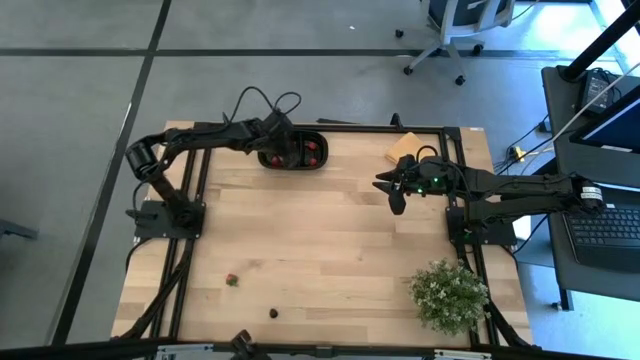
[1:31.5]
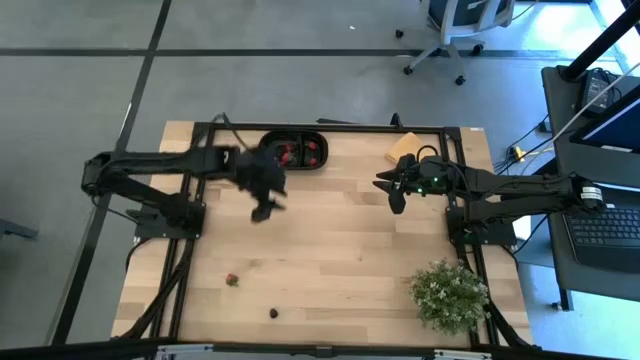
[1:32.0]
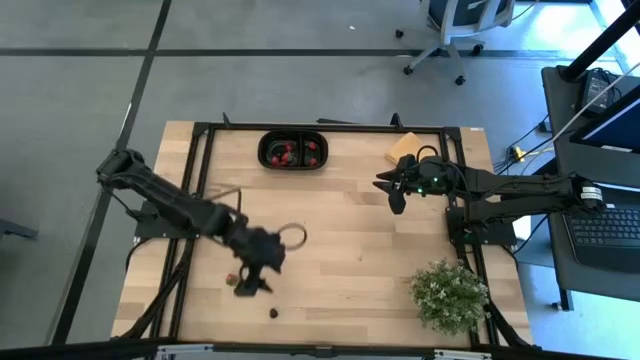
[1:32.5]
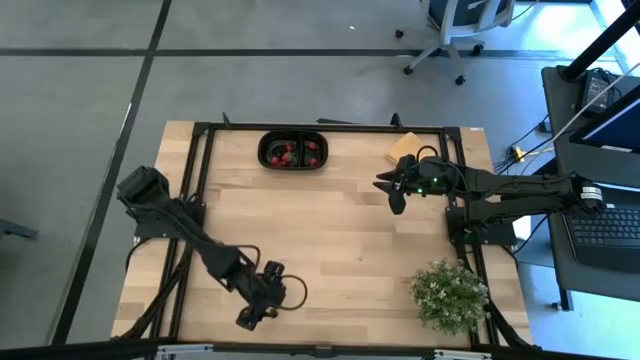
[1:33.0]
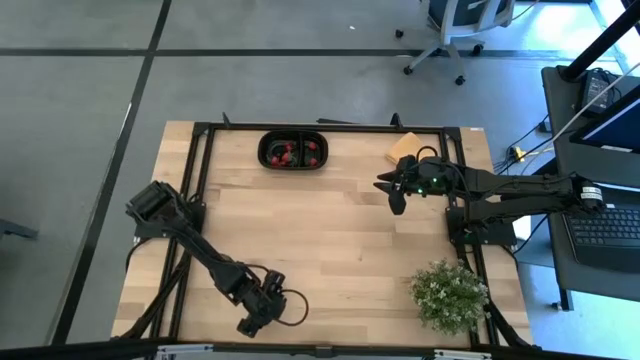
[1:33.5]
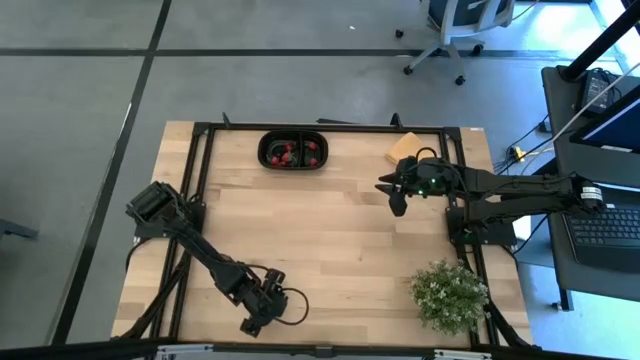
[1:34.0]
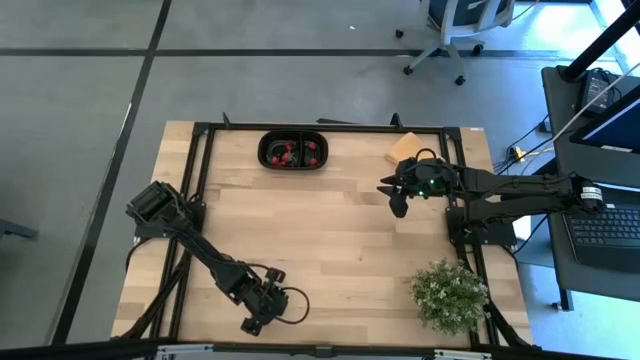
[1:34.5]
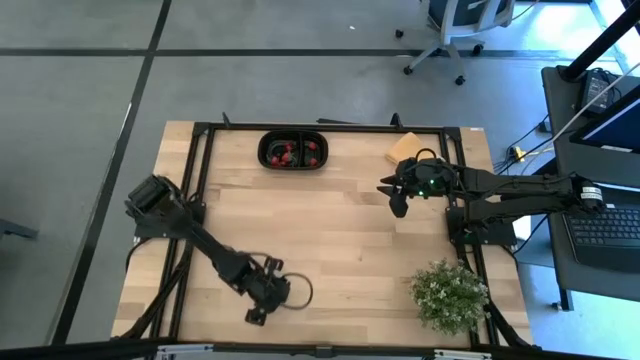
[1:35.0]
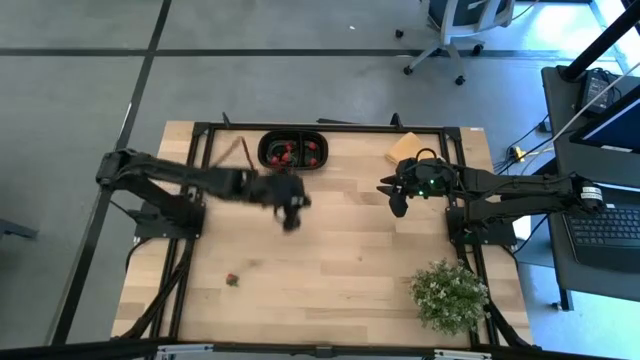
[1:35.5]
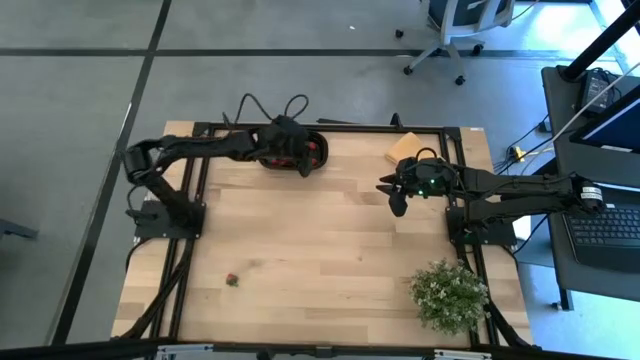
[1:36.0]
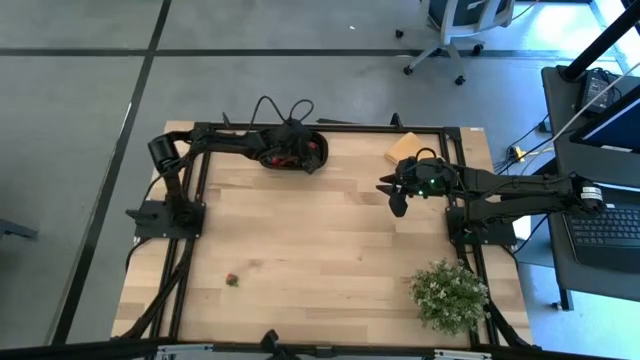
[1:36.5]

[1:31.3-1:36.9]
Task: Pick and placing Produce into tupperware
Put the blackberry into the black bin

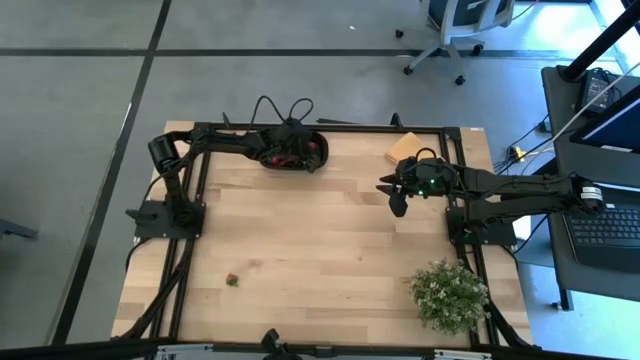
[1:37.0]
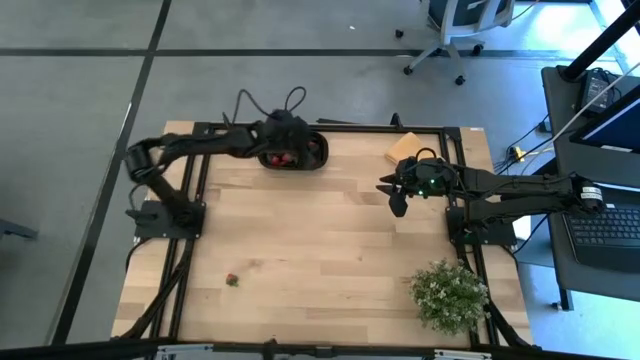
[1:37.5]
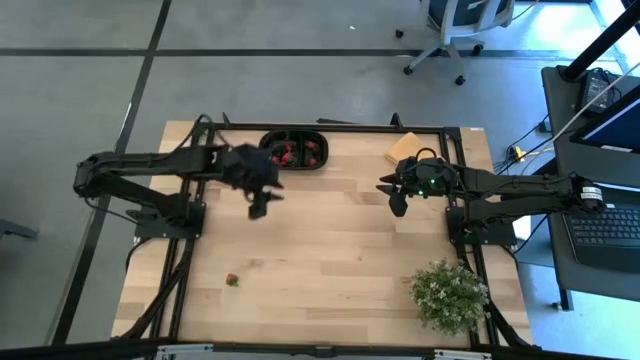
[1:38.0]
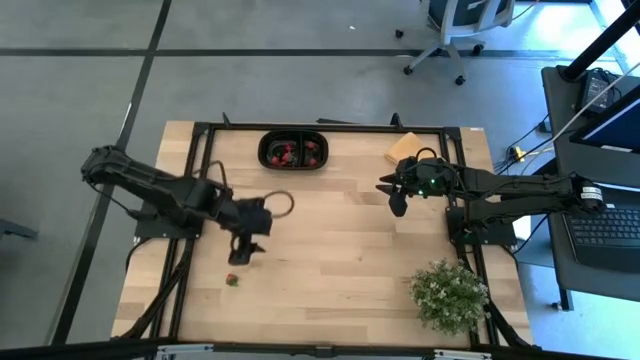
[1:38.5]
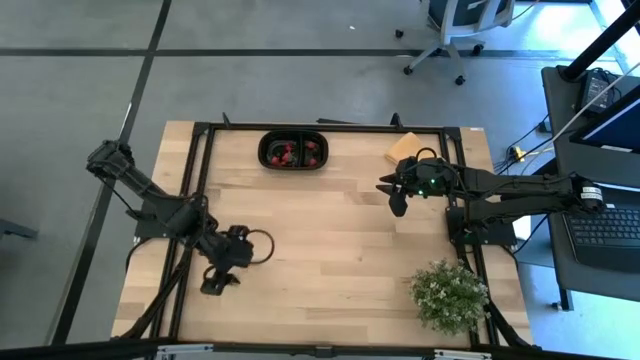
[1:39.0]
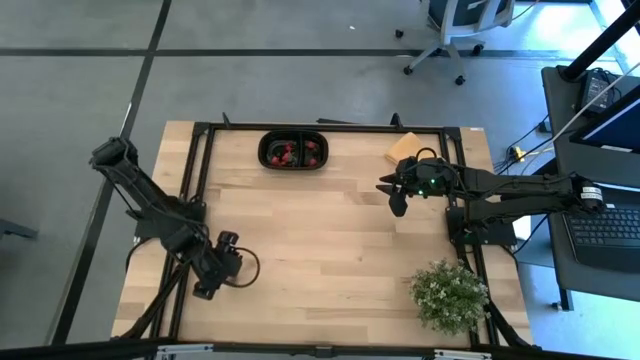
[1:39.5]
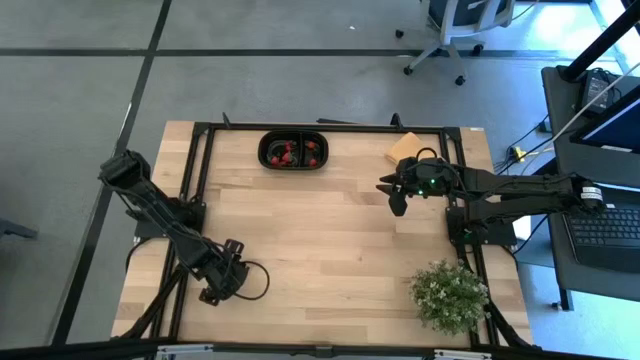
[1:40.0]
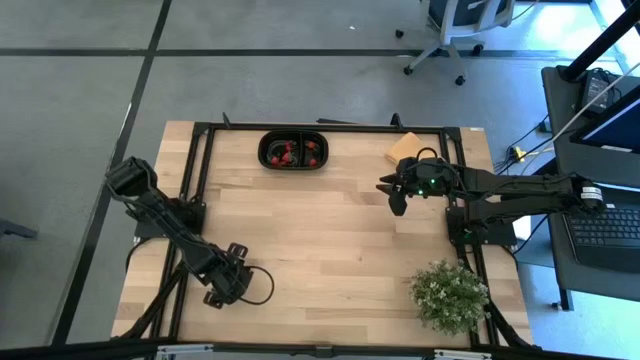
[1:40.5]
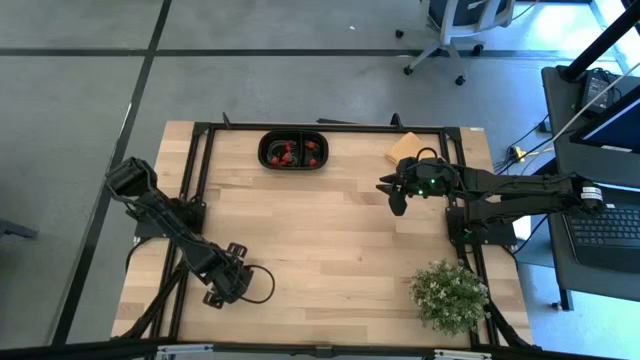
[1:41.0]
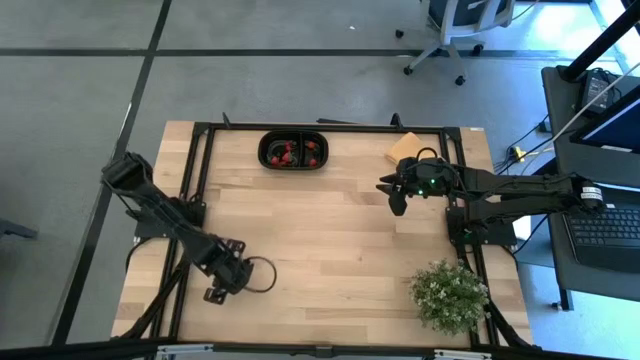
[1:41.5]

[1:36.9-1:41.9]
Put the strawberry into the black bin

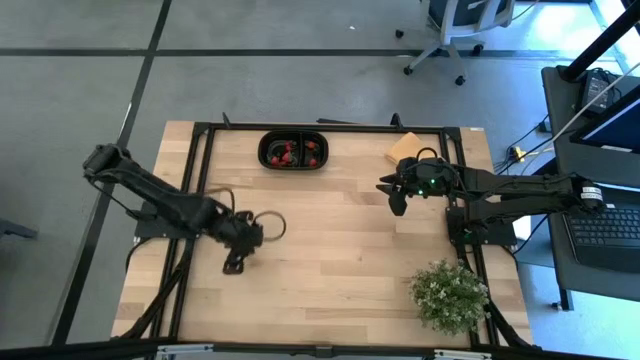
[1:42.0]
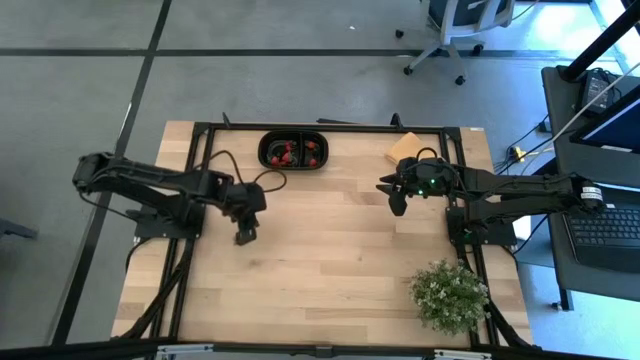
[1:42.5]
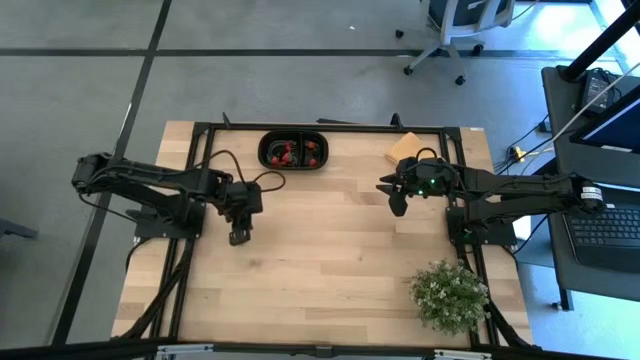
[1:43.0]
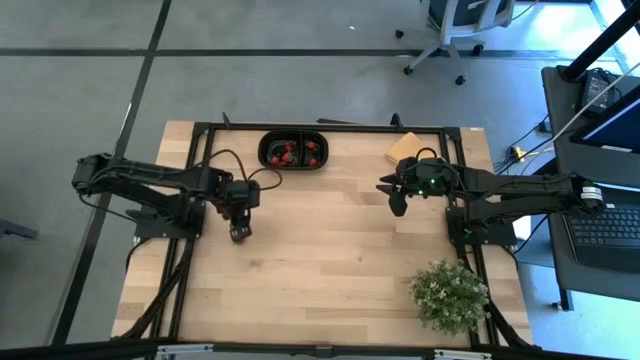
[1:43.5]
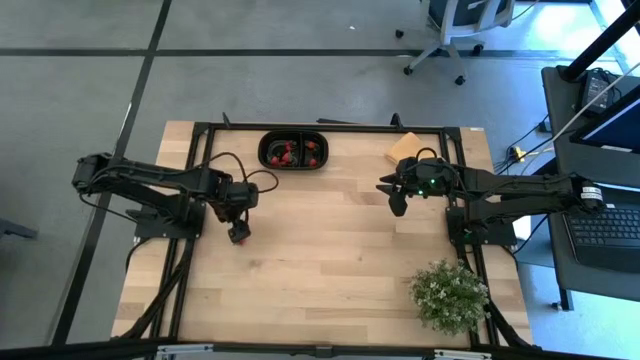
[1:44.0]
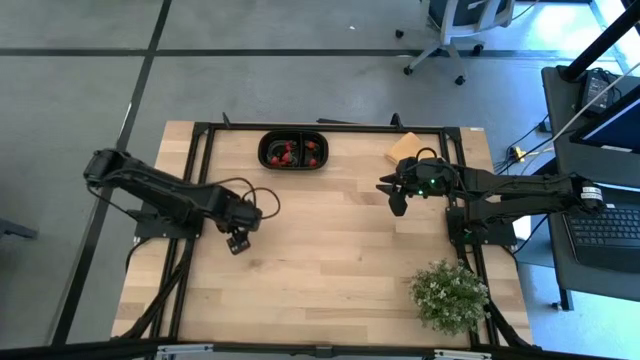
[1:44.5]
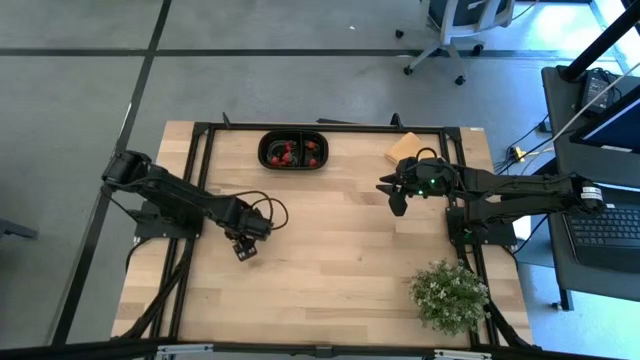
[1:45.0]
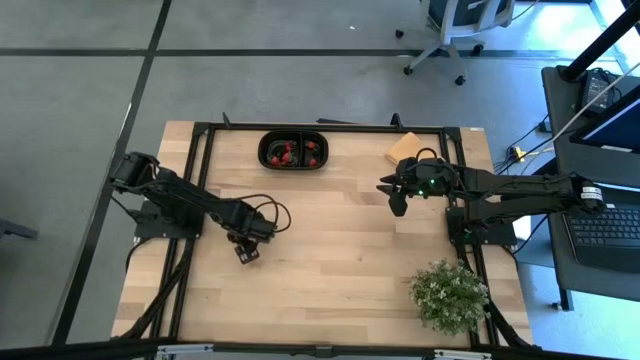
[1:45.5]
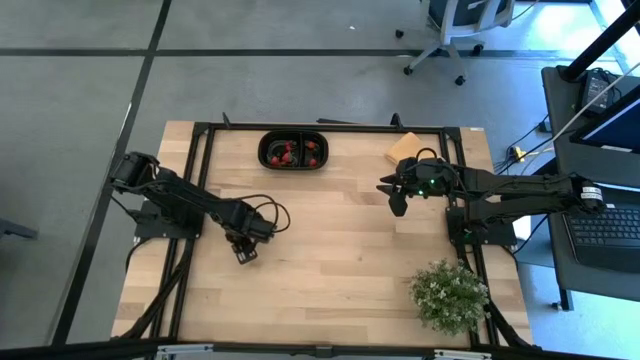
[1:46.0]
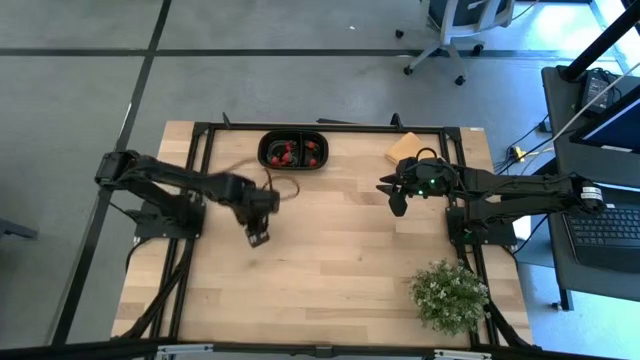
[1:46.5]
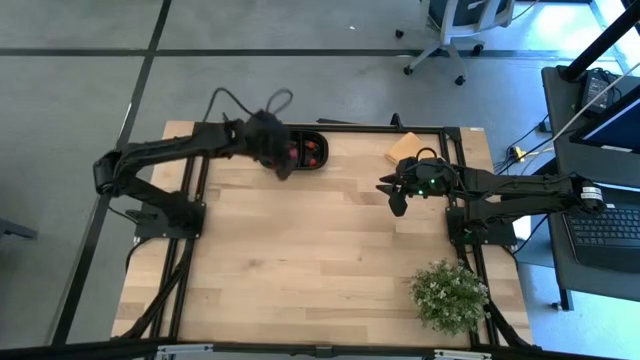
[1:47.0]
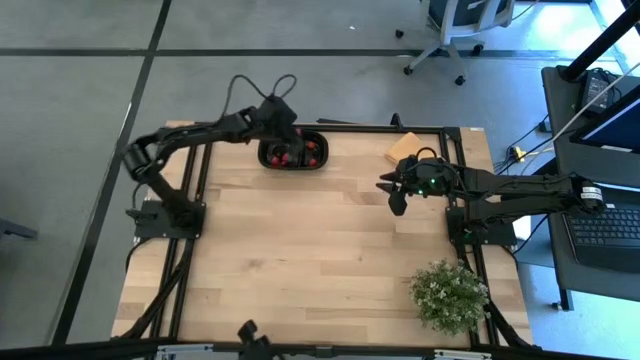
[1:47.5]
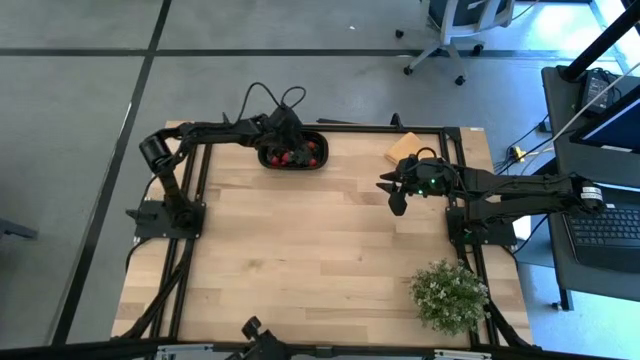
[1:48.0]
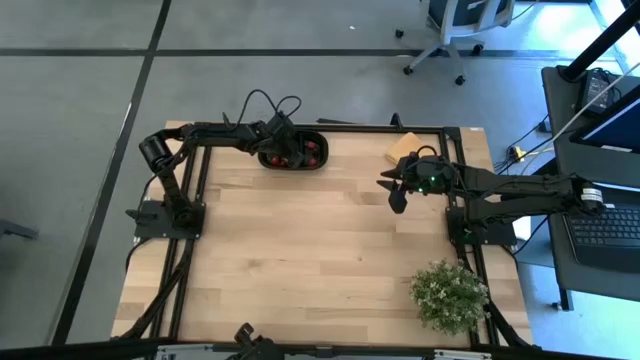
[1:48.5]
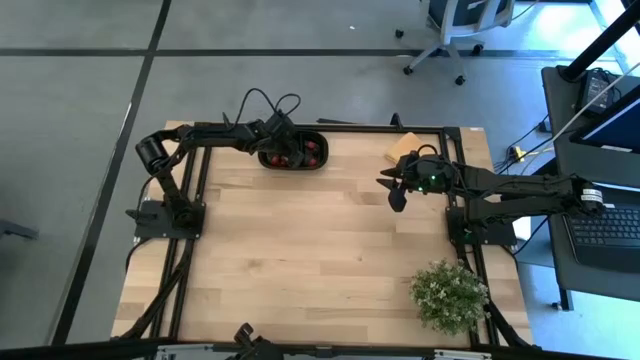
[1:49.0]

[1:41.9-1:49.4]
Put the strawberry into the black bin

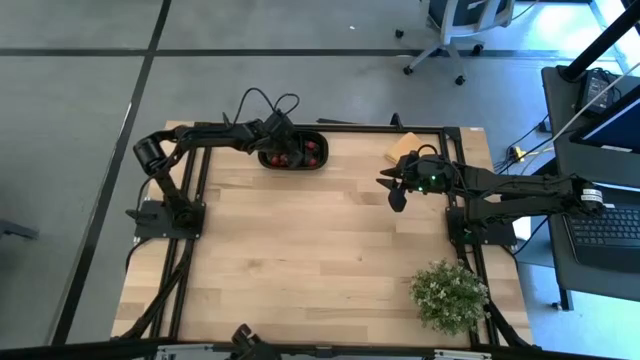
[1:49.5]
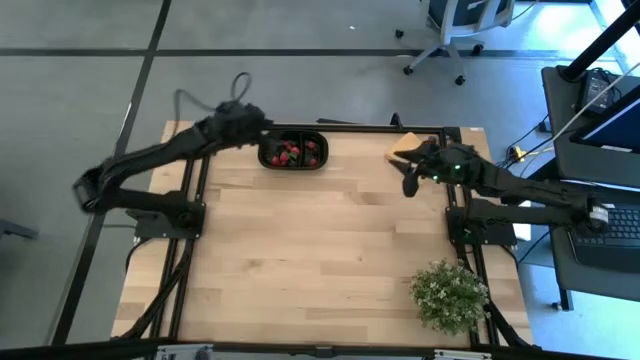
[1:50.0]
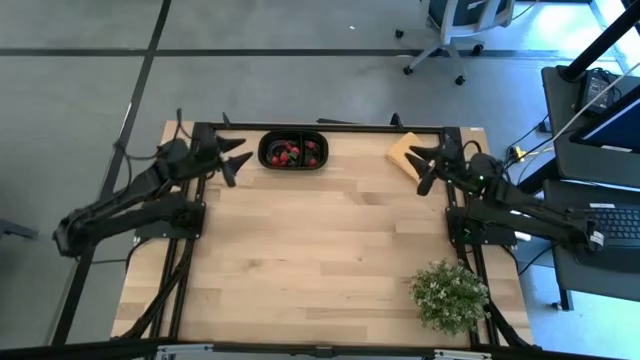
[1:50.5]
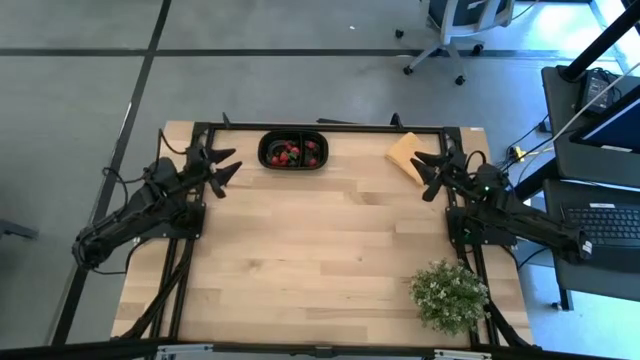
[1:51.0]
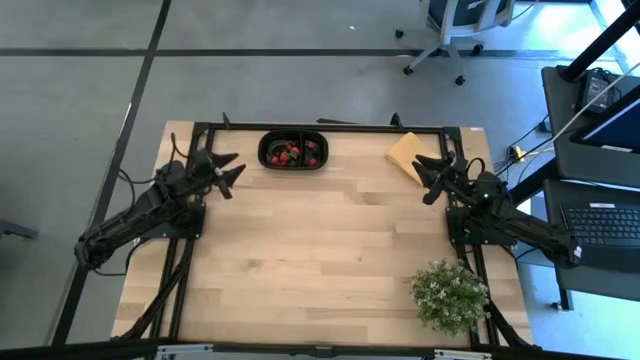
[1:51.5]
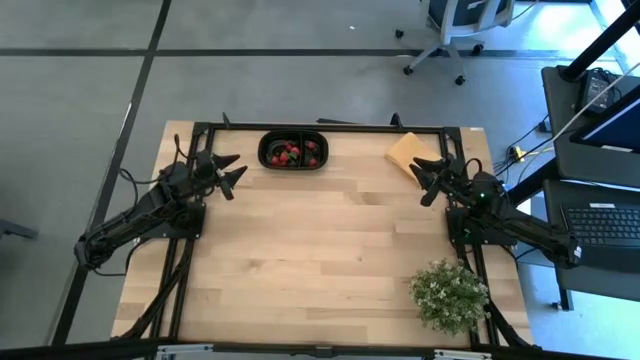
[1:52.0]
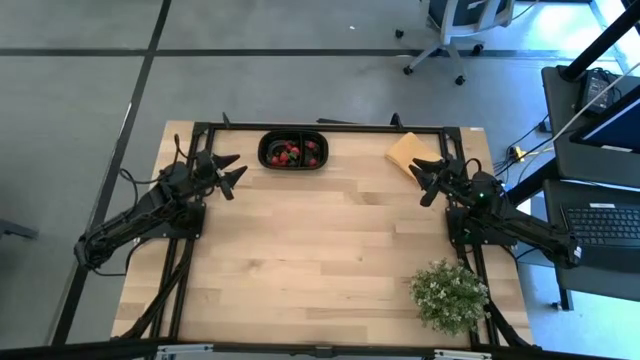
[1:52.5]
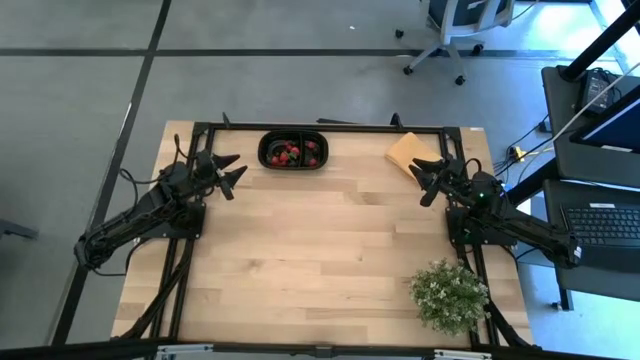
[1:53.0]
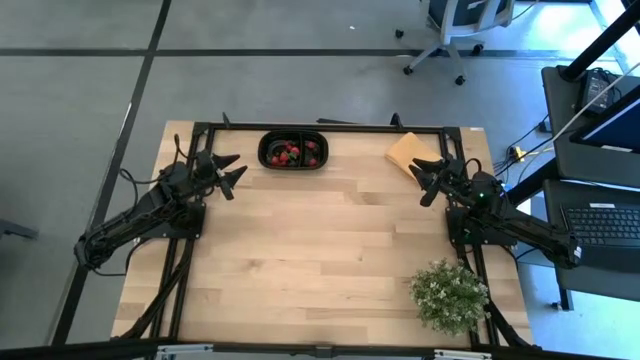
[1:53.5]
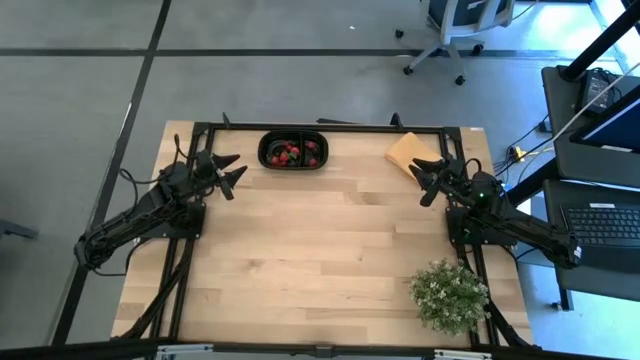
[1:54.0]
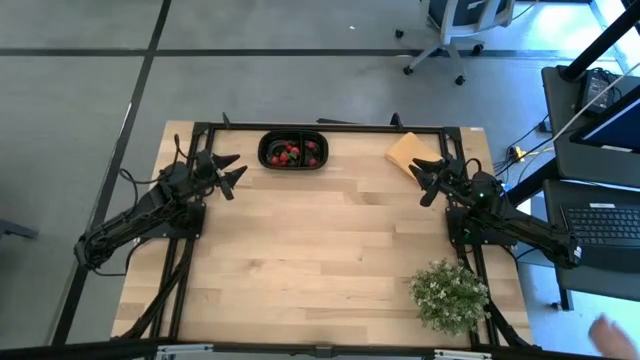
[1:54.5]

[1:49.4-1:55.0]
Return to Home Position
